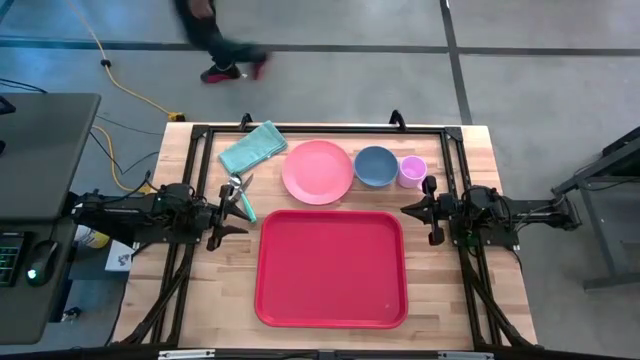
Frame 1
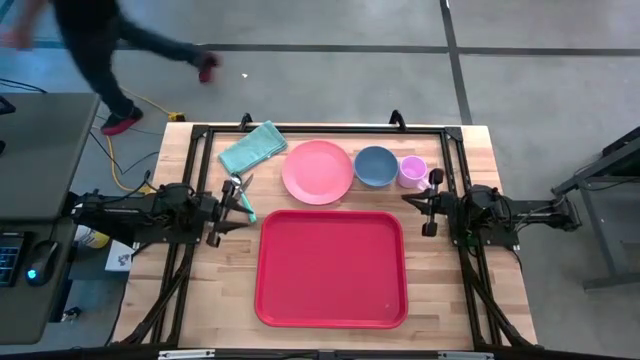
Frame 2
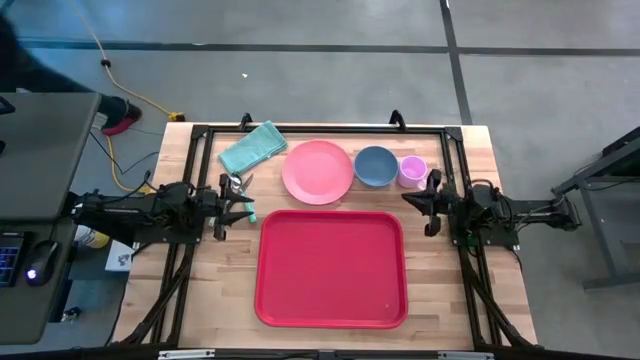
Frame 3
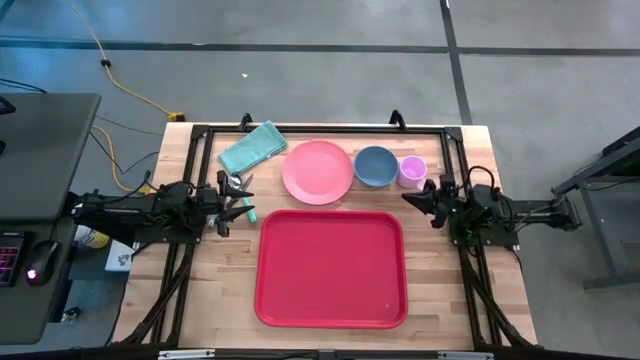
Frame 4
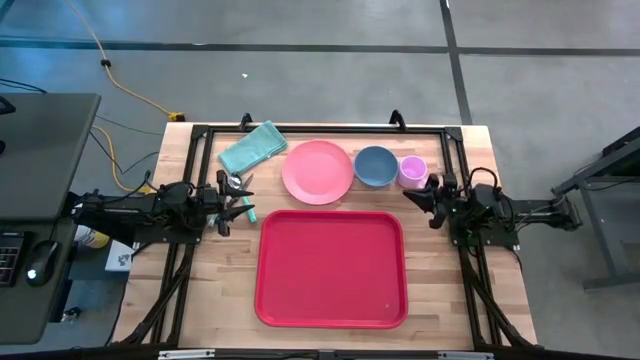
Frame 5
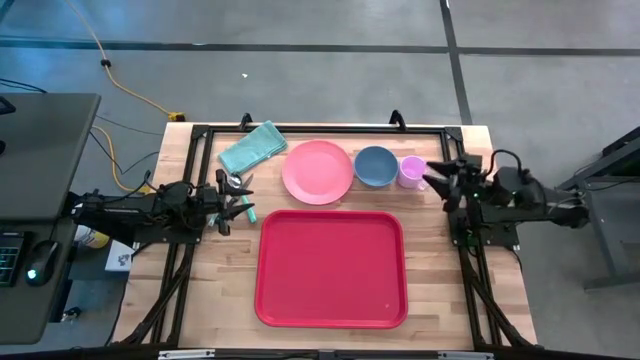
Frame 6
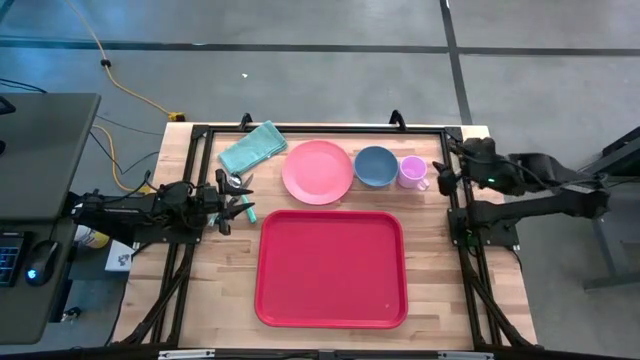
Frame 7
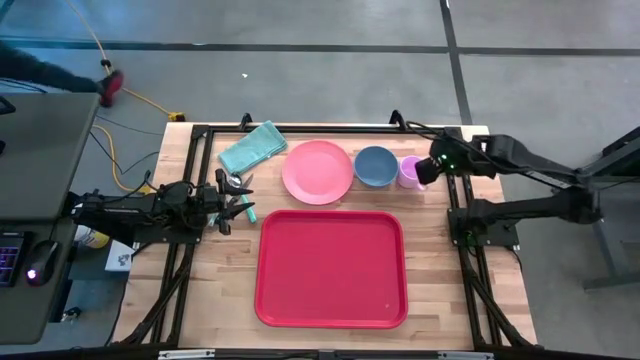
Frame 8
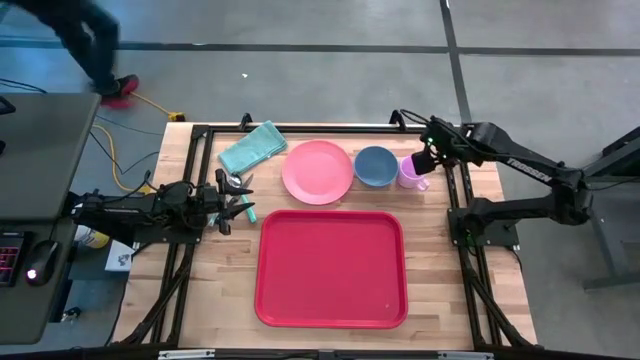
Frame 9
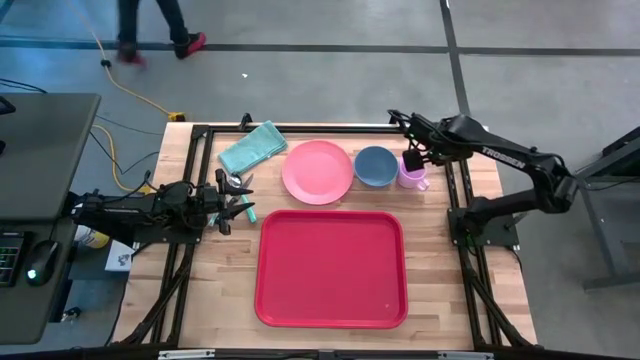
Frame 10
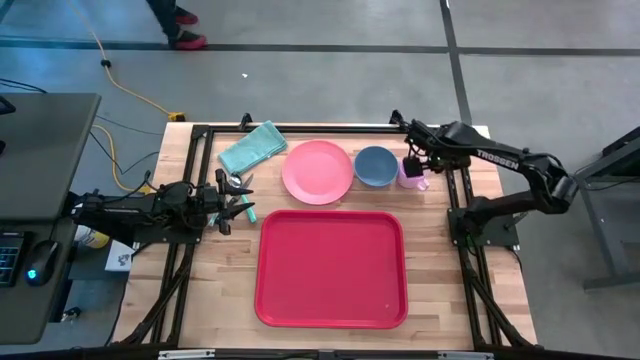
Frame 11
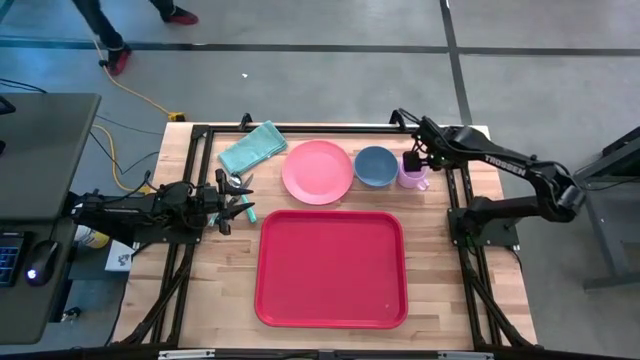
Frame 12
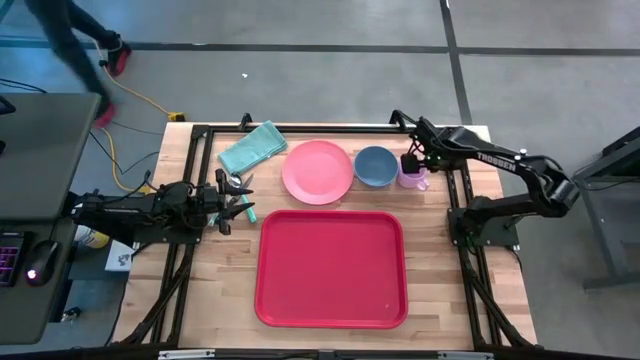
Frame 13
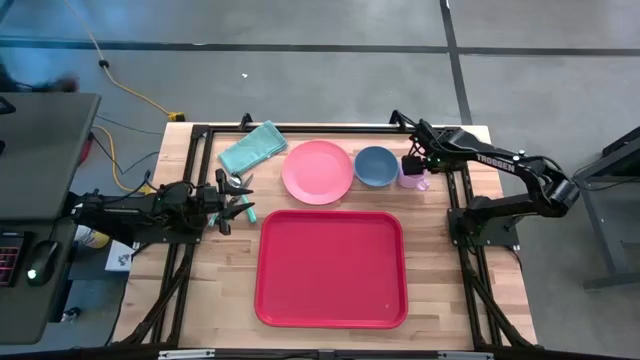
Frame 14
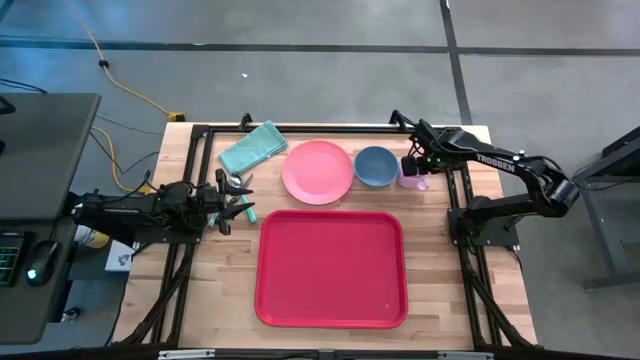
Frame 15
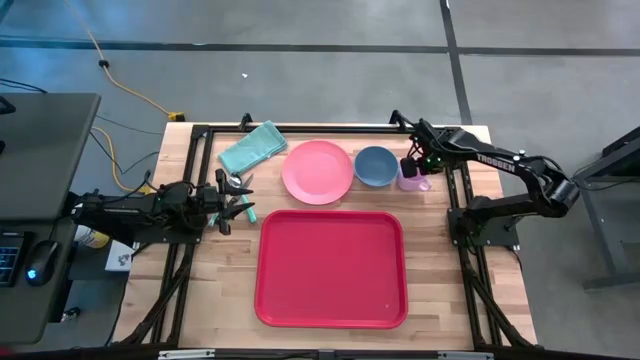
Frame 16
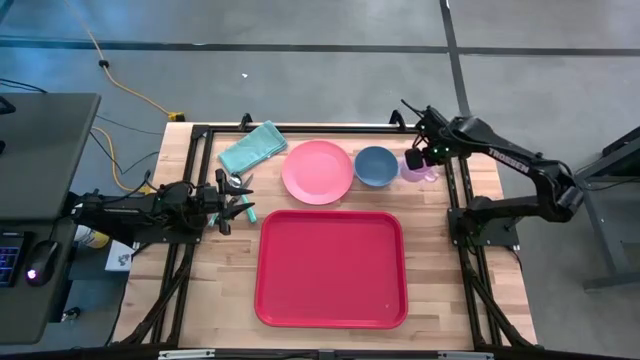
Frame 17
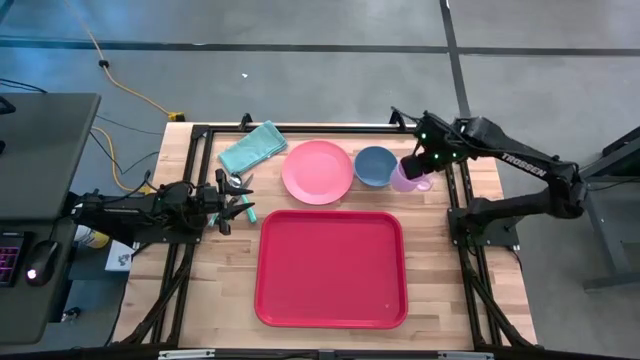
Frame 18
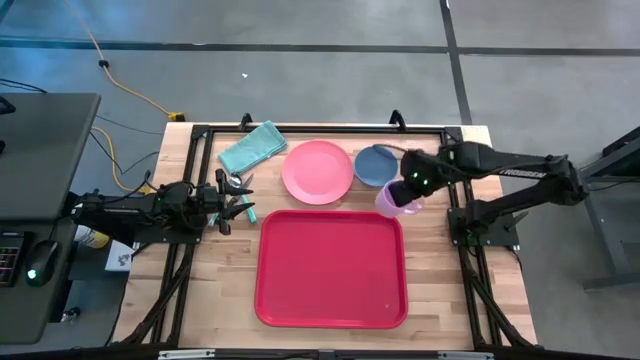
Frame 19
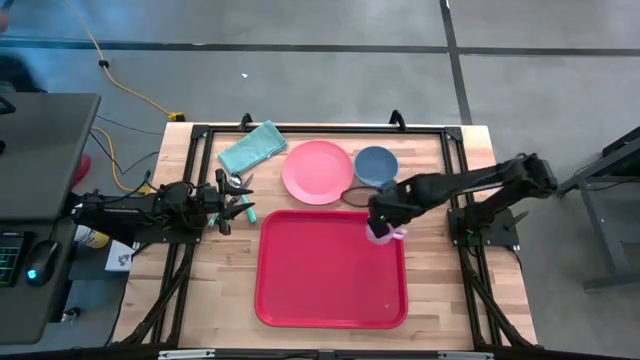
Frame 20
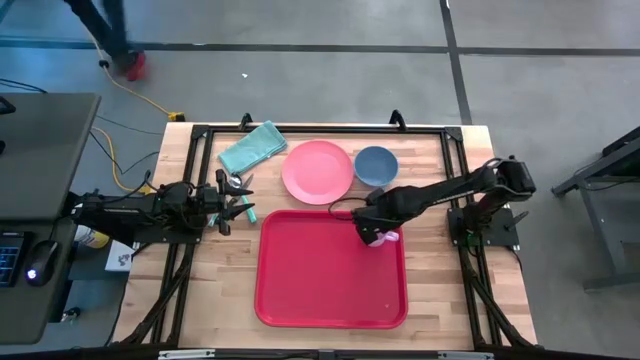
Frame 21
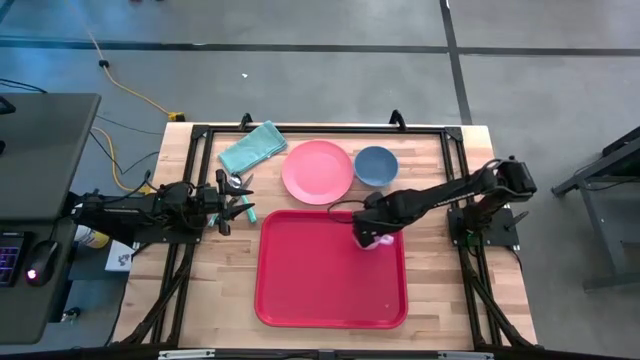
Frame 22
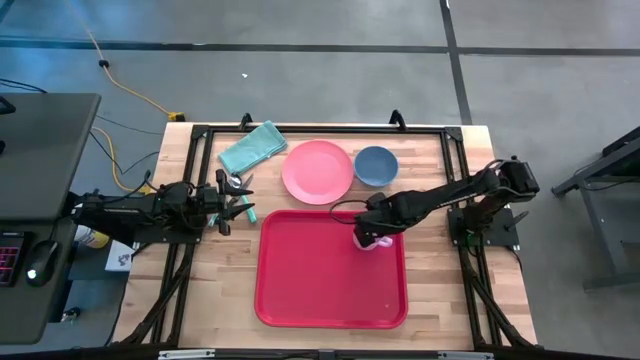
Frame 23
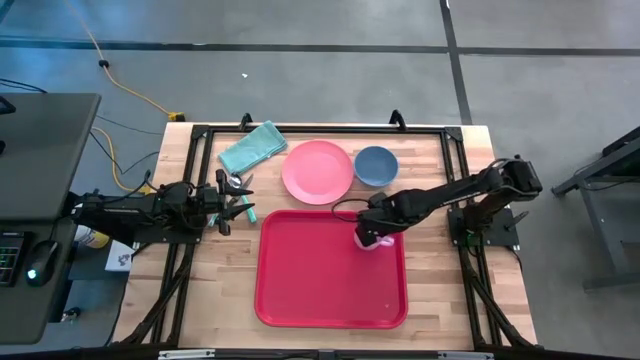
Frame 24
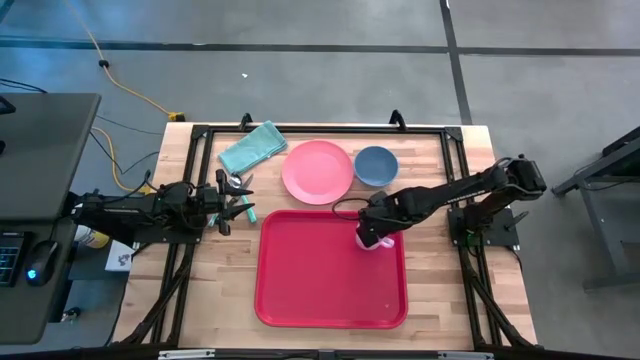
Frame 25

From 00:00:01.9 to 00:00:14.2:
Task: Set up tray
Put the purple cup on top right of the red serving tray

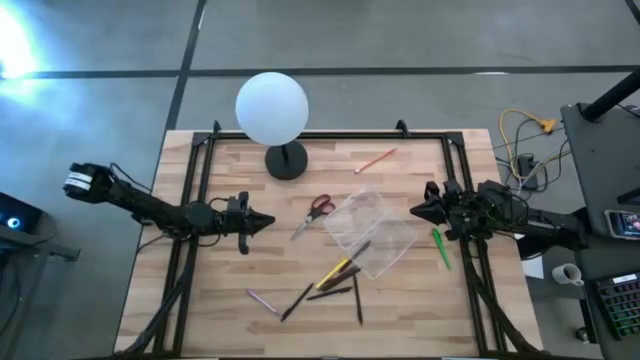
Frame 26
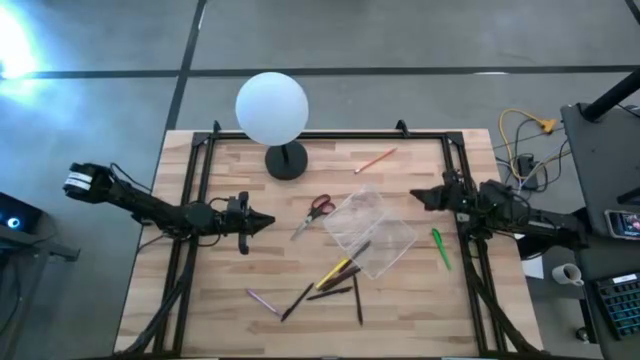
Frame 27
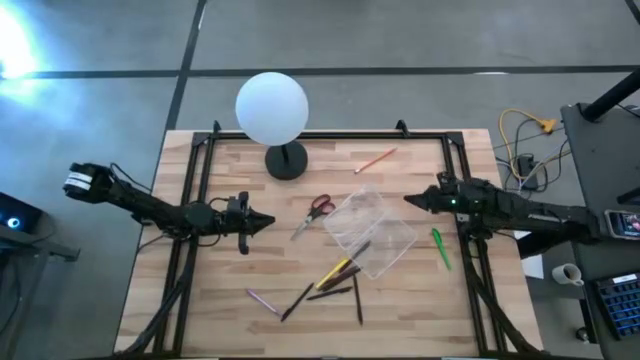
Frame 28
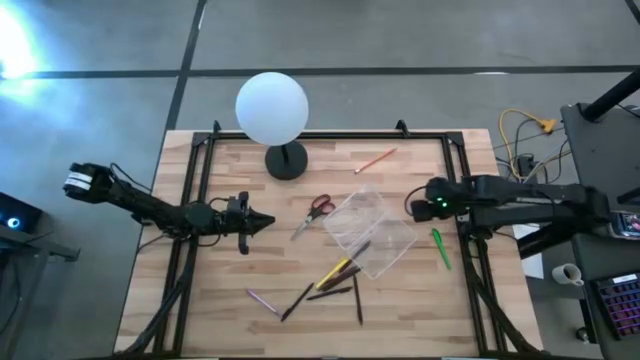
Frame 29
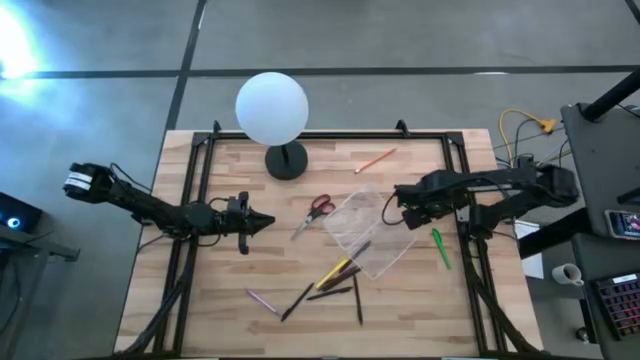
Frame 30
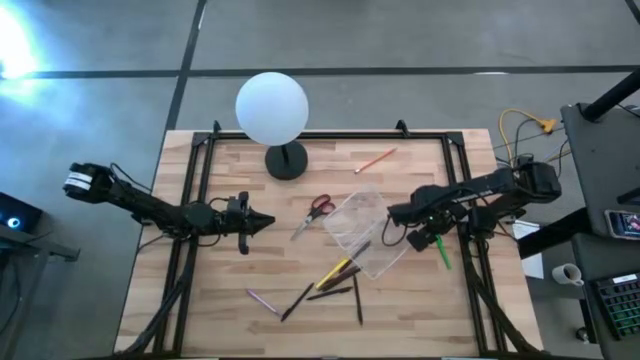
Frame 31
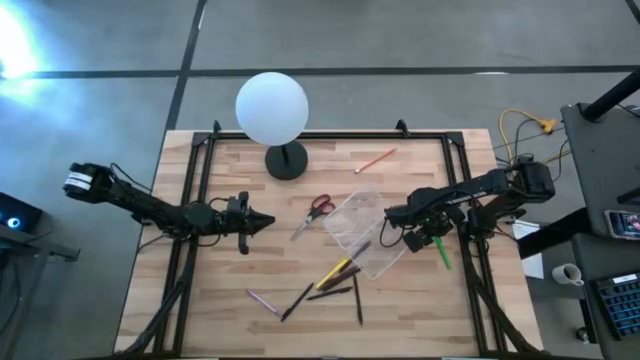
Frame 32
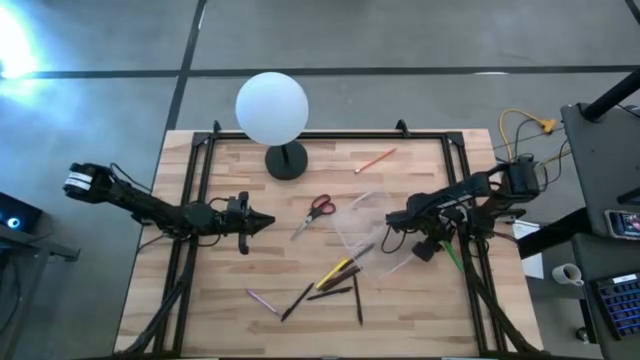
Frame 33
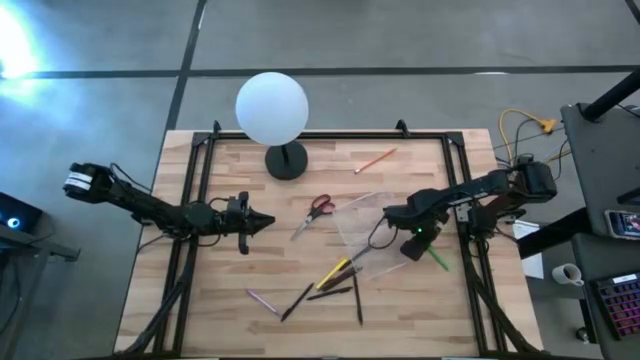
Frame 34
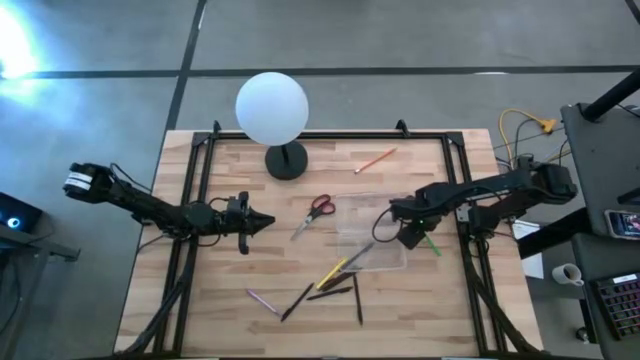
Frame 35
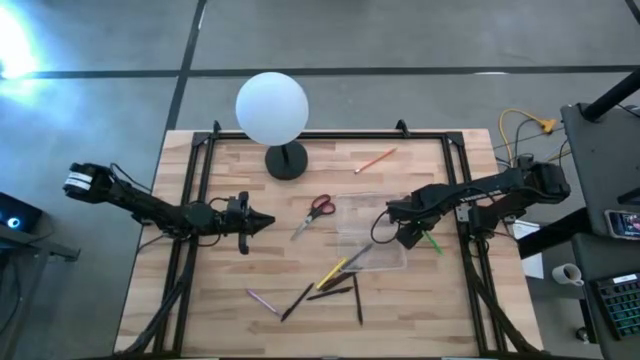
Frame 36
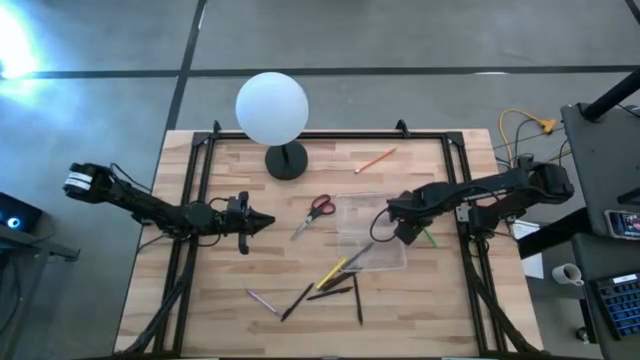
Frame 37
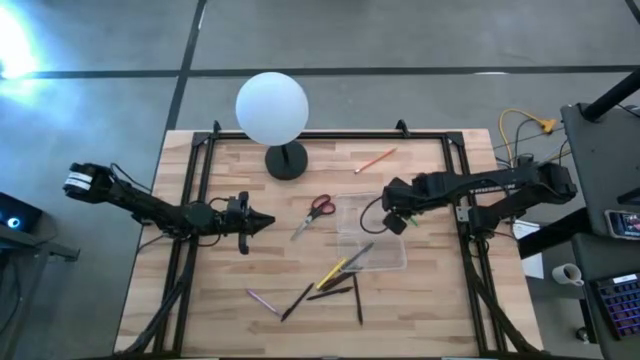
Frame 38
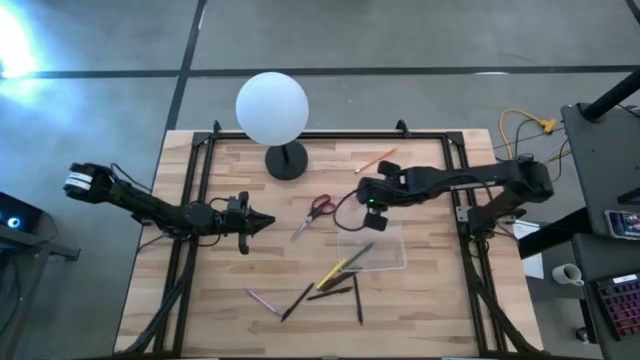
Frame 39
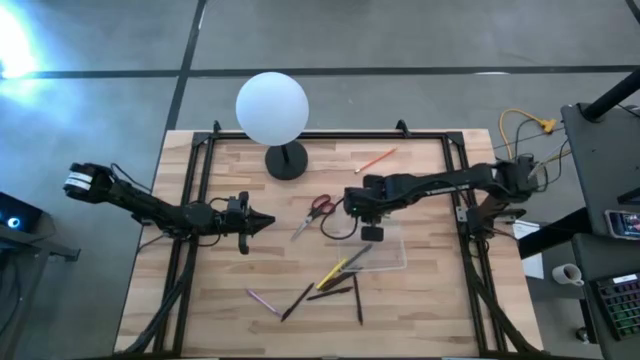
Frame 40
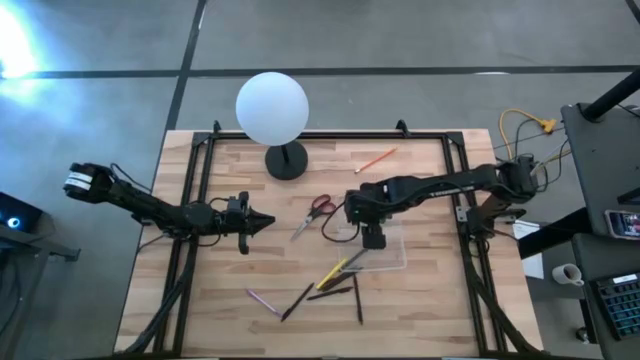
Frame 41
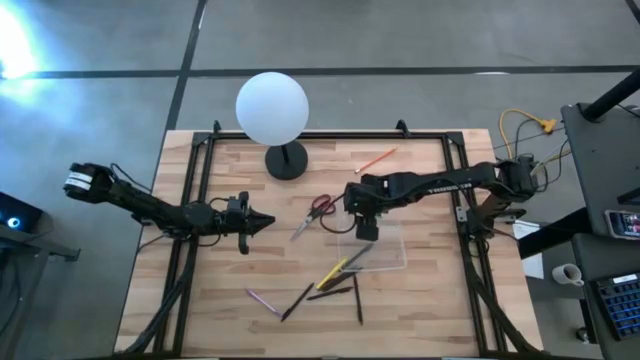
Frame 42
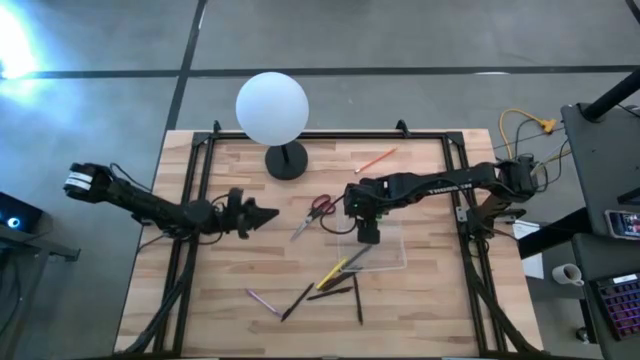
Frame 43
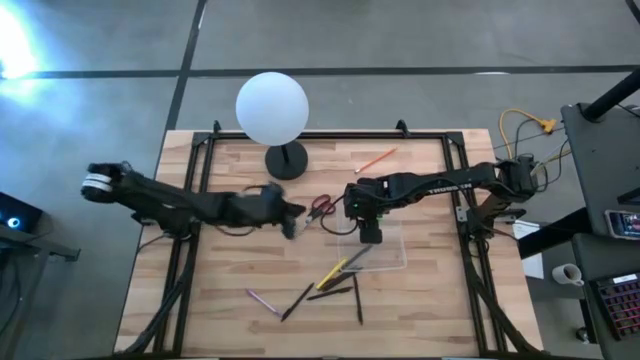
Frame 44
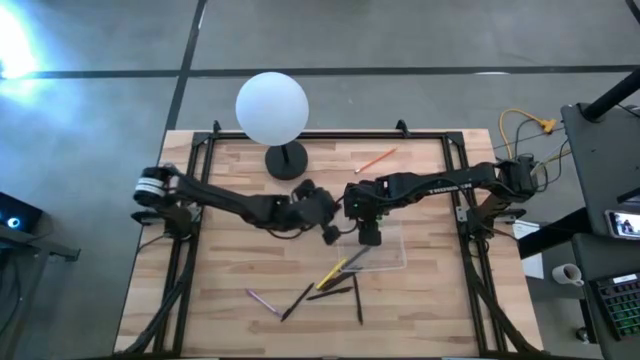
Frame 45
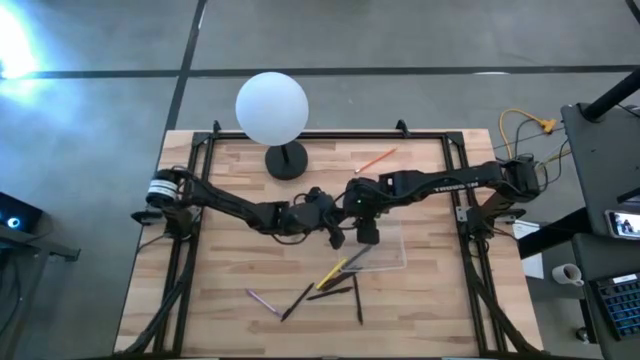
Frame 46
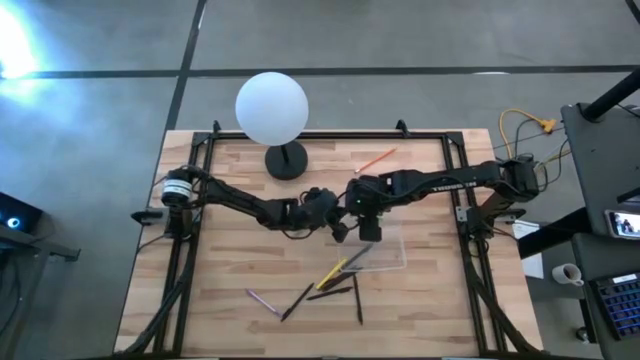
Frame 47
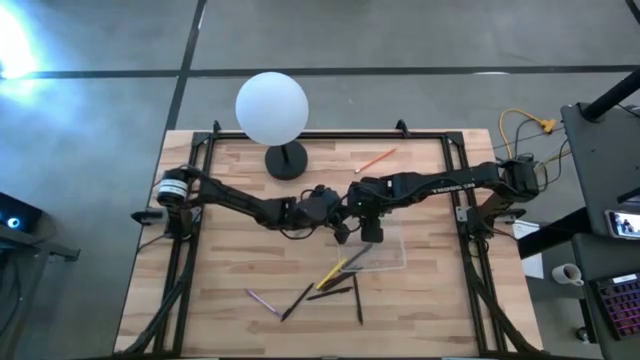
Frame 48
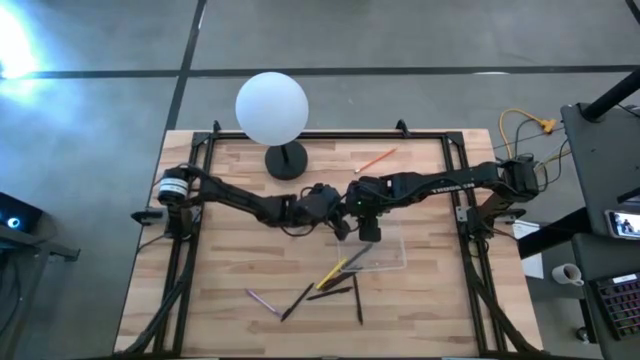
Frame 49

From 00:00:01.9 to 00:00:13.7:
Task: Pick & place school supplies into a supply box
Put the green ballpen into the supply box
